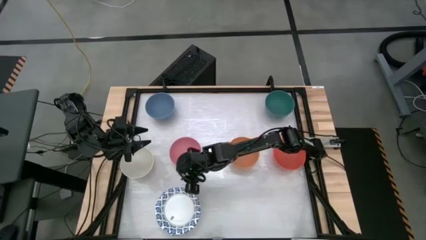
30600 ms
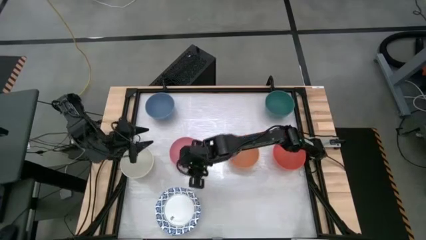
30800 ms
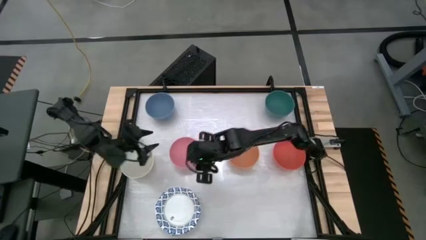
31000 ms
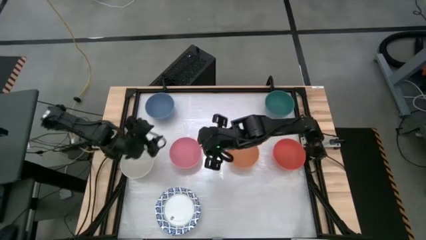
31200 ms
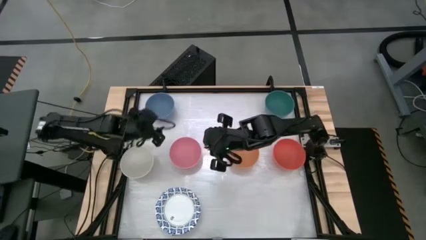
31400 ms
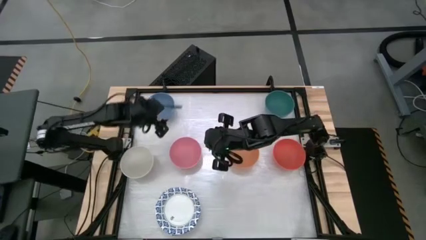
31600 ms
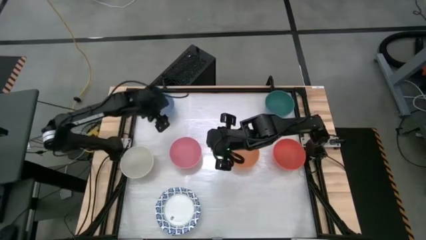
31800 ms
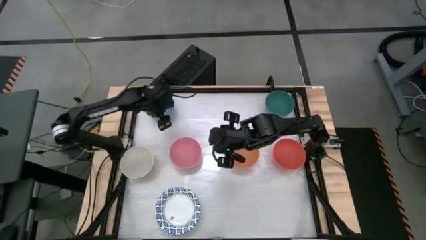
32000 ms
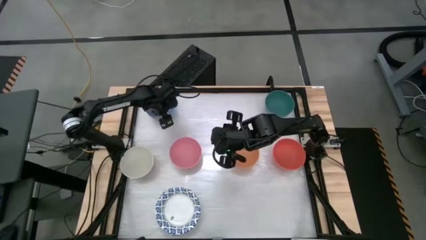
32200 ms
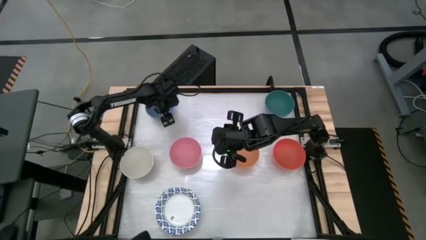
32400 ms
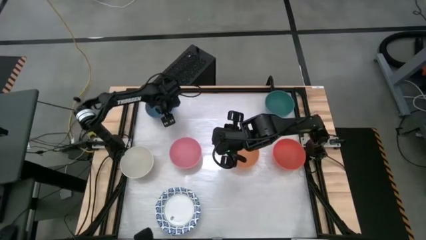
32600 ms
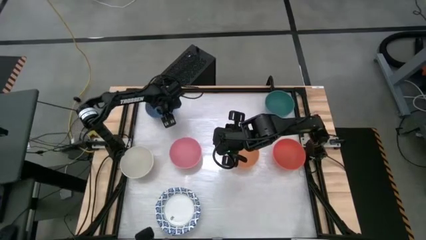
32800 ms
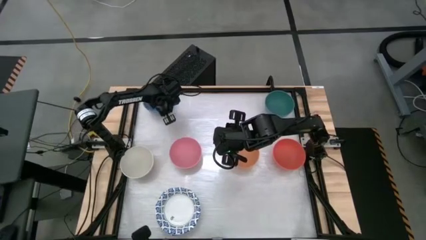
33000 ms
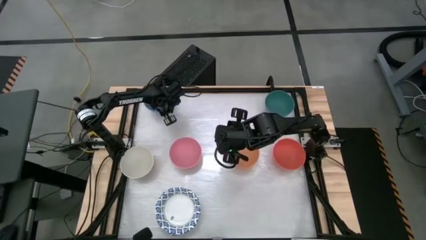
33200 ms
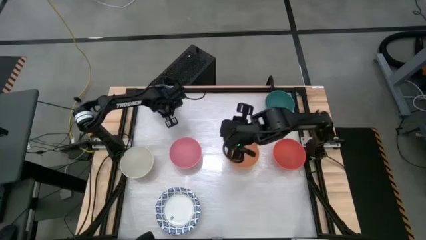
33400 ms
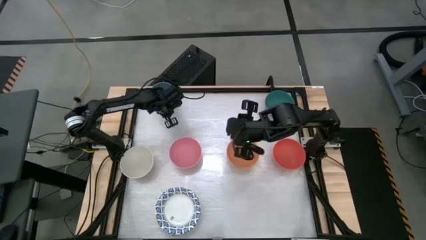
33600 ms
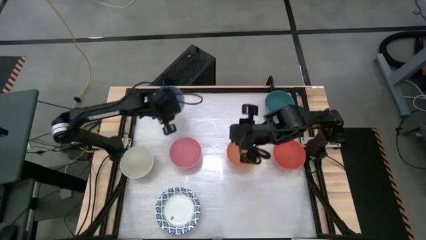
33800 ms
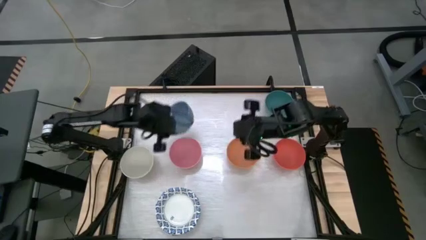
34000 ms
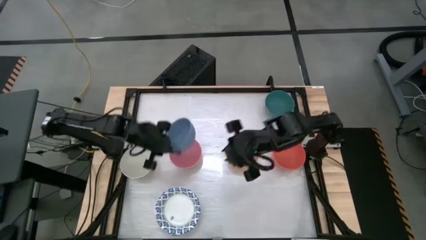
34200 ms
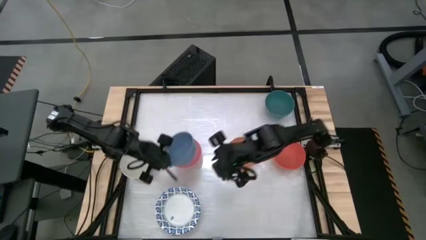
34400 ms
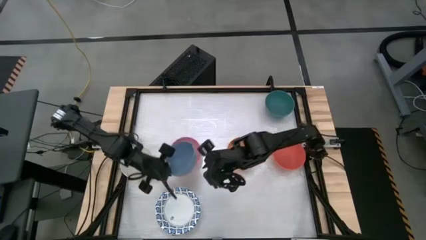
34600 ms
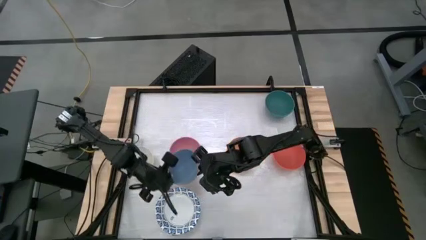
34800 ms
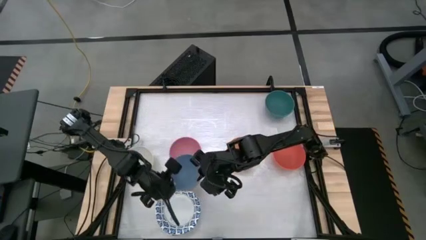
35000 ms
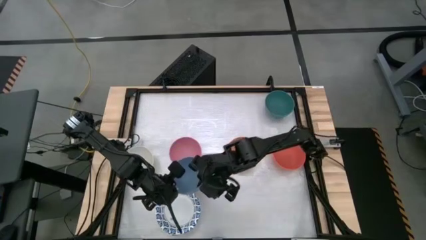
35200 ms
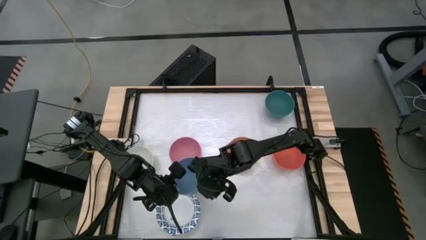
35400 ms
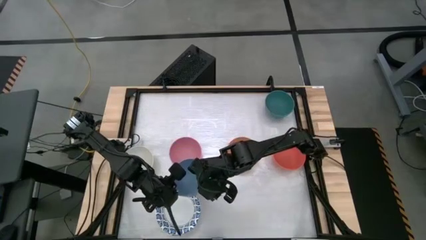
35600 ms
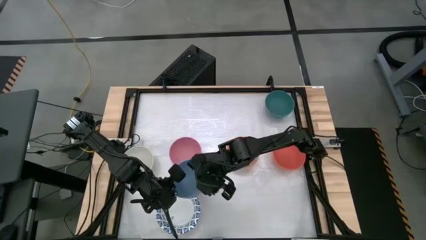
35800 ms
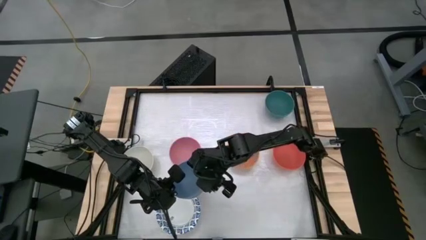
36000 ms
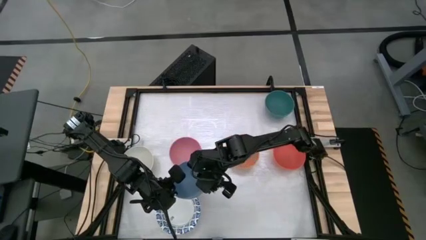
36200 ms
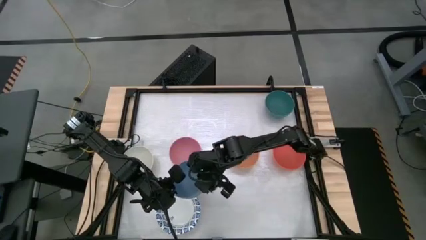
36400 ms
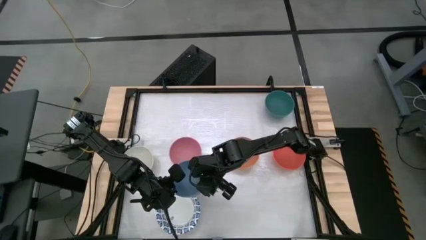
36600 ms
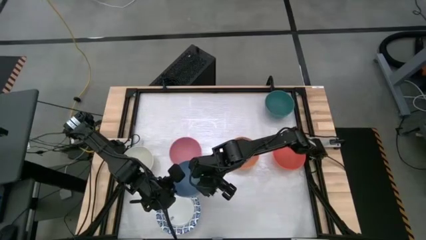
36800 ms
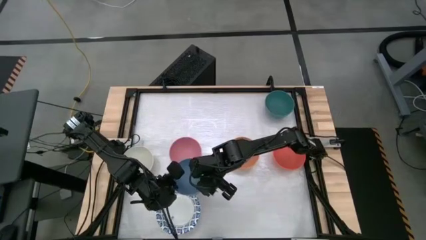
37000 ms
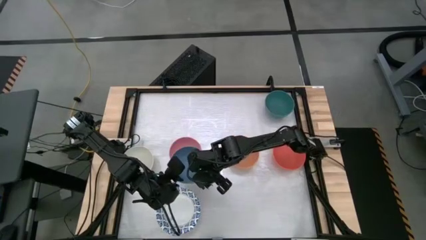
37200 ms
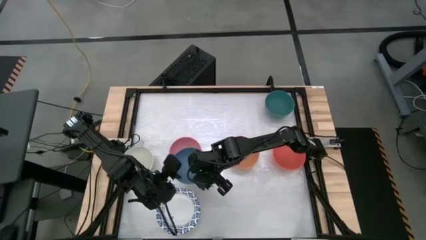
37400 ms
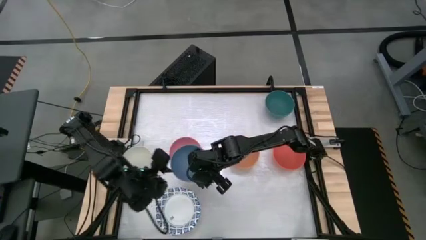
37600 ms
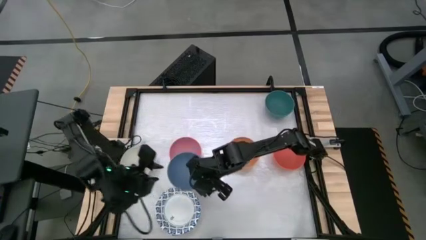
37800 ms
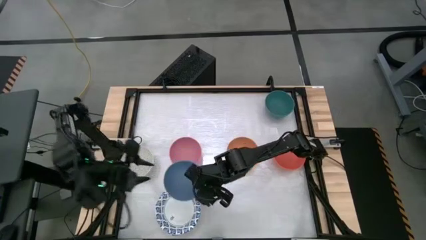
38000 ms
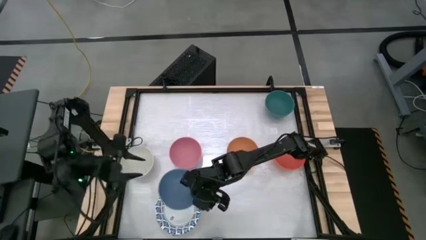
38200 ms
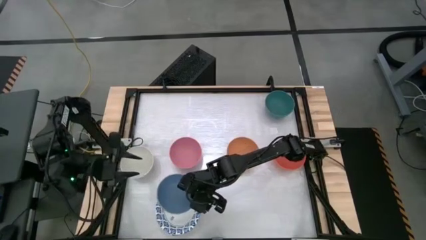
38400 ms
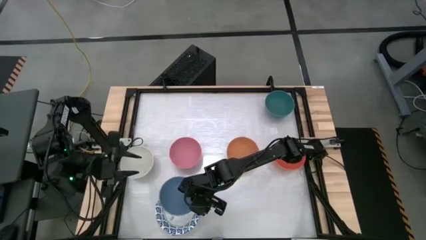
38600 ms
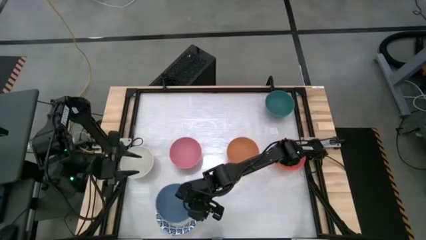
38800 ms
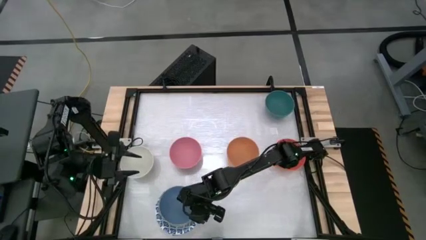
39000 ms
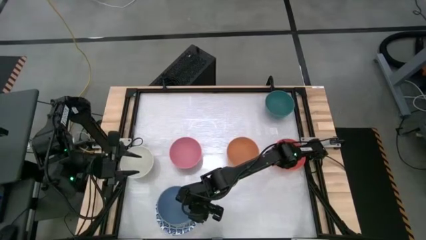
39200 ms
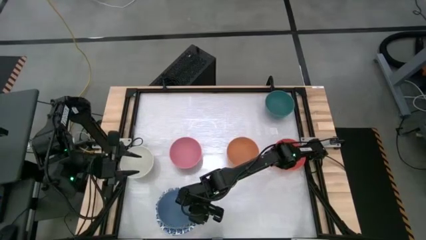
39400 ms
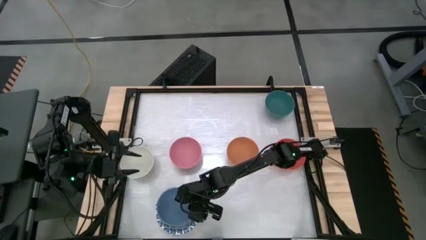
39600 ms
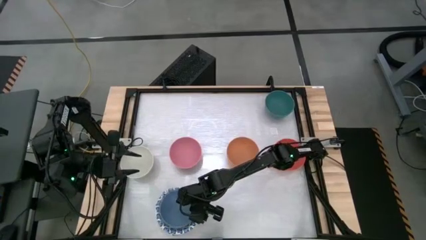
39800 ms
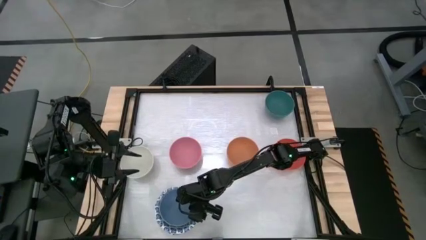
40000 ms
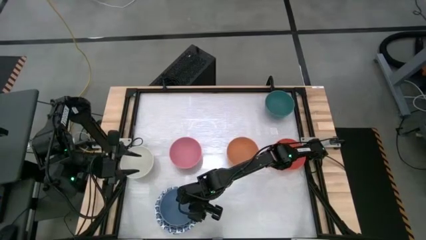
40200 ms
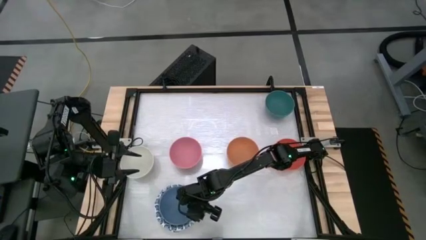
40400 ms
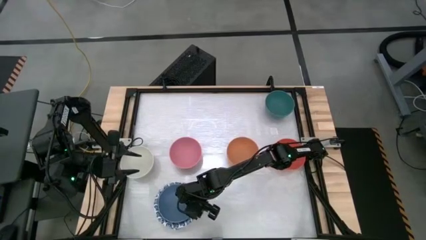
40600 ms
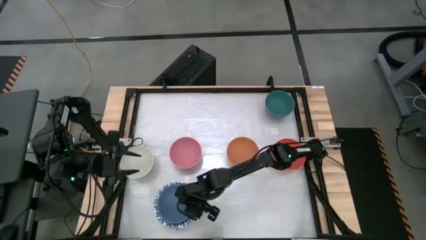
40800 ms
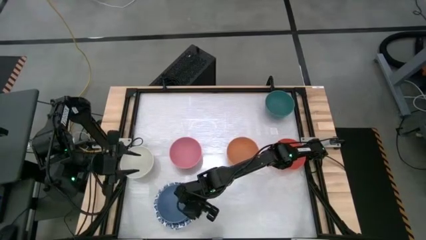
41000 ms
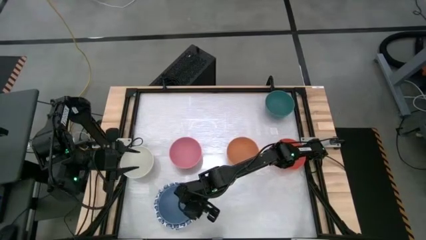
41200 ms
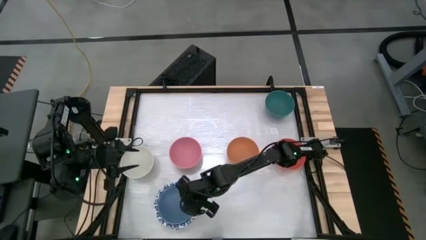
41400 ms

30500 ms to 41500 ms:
Stack the blue bowl on top of the other blue patterned bowl

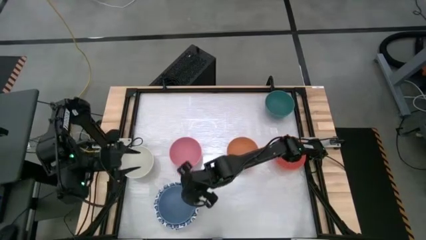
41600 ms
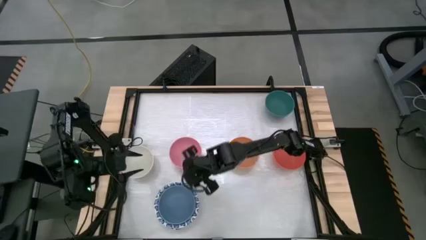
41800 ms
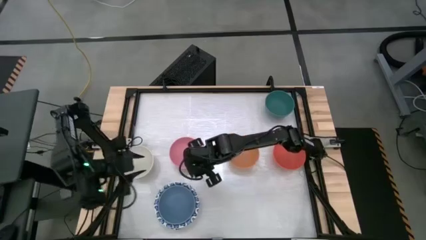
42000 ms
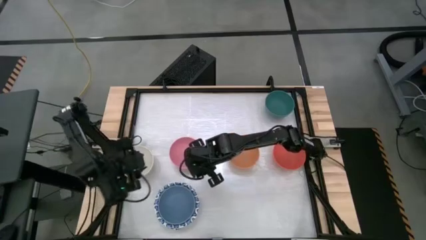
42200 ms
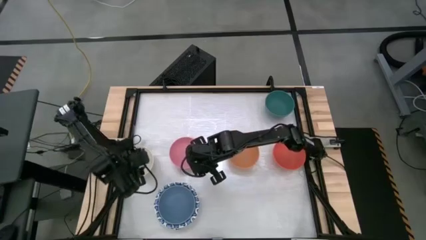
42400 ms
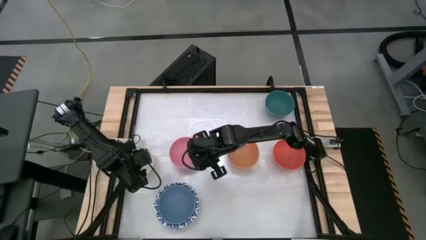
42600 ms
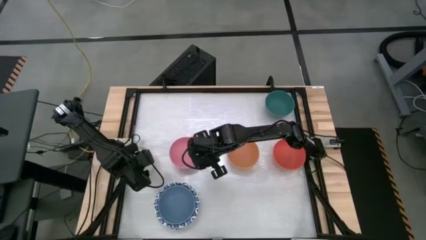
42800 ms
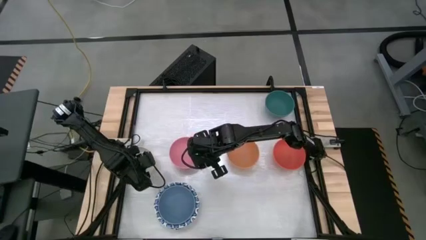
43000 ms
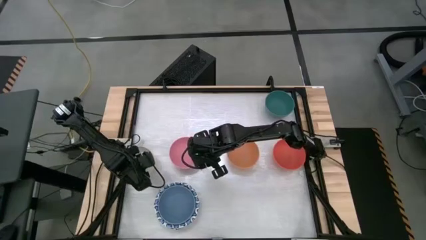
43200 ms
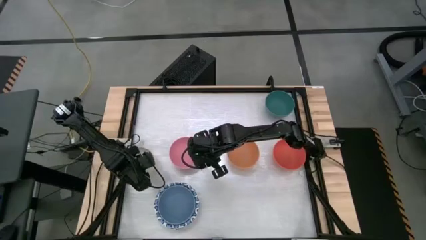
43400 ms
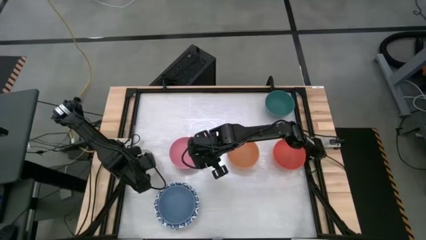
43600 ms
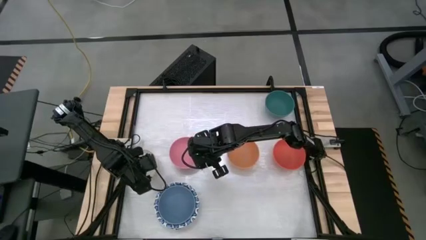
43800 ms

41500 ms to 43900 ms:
Stack the white bowl on top of the other blue bowl
